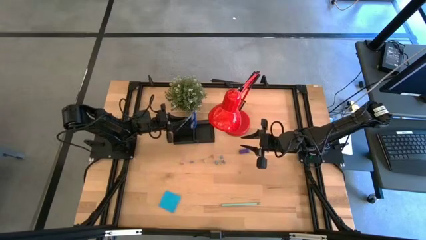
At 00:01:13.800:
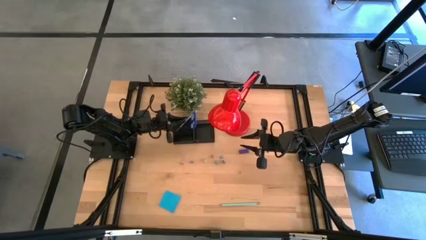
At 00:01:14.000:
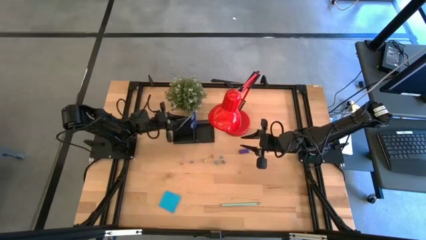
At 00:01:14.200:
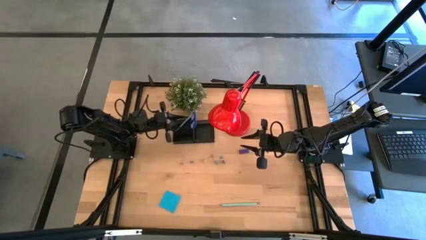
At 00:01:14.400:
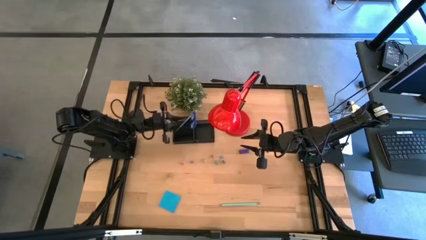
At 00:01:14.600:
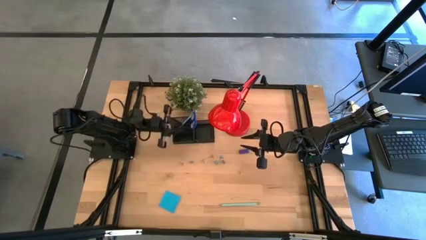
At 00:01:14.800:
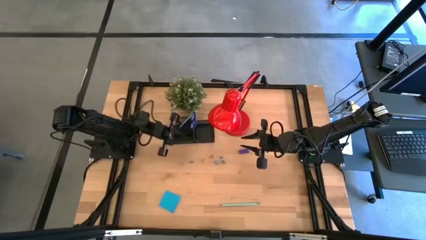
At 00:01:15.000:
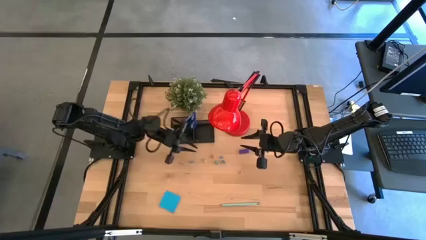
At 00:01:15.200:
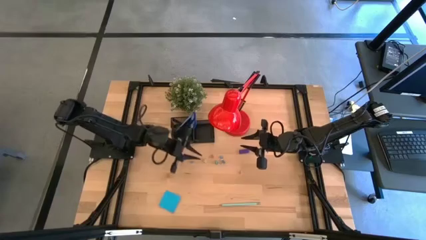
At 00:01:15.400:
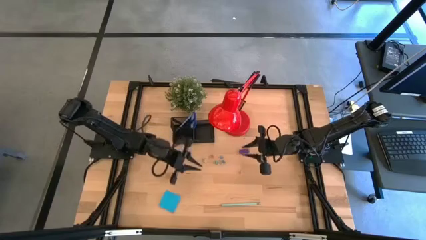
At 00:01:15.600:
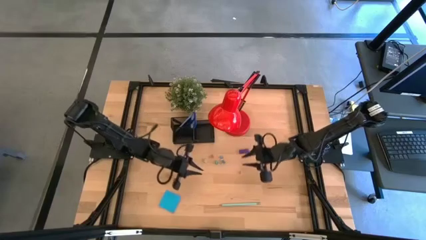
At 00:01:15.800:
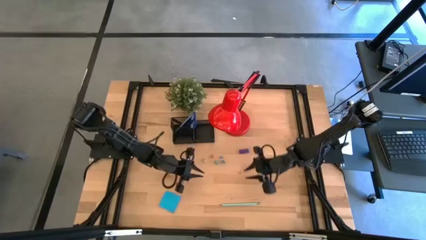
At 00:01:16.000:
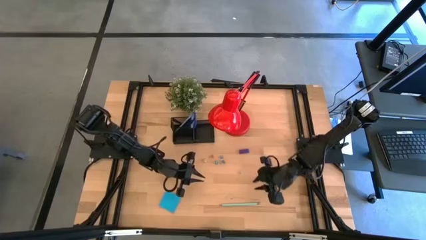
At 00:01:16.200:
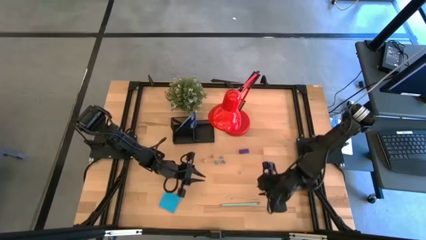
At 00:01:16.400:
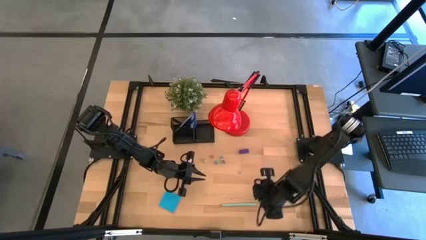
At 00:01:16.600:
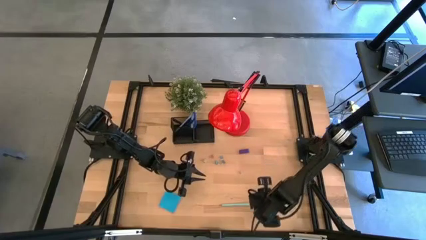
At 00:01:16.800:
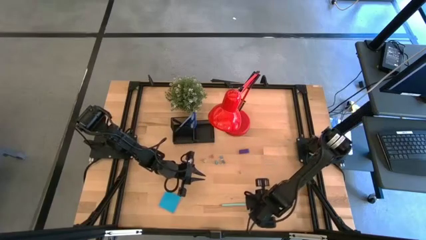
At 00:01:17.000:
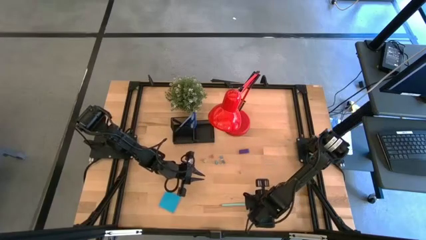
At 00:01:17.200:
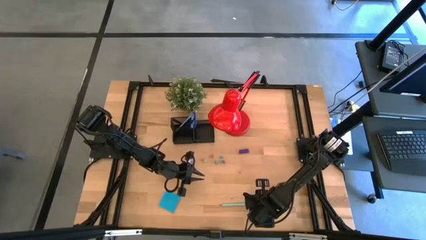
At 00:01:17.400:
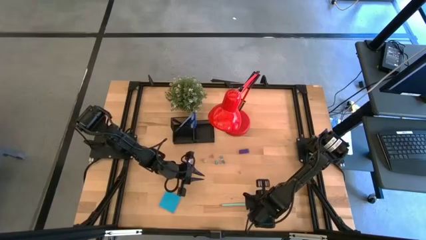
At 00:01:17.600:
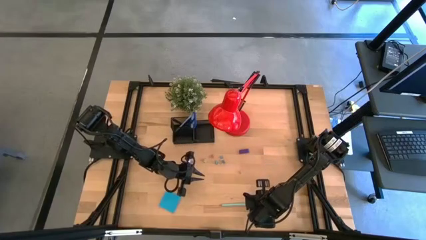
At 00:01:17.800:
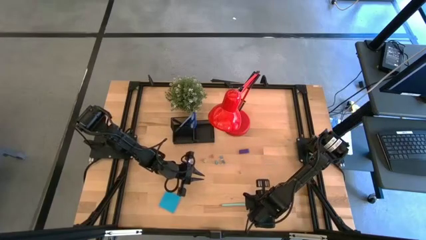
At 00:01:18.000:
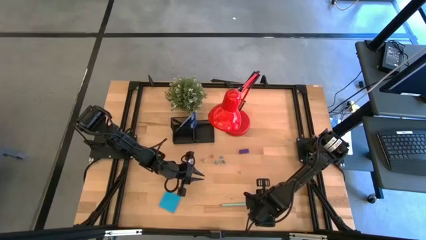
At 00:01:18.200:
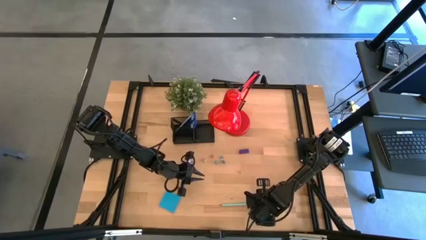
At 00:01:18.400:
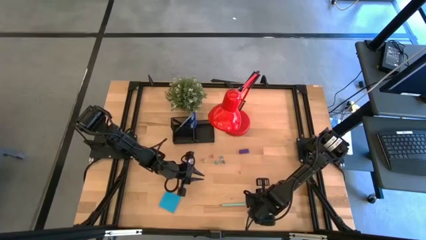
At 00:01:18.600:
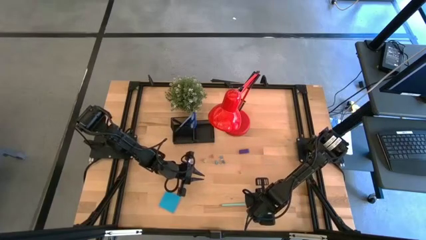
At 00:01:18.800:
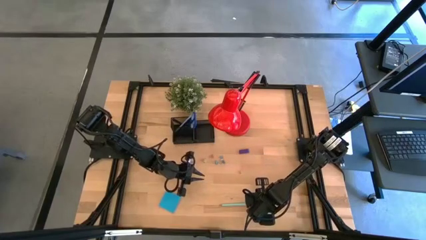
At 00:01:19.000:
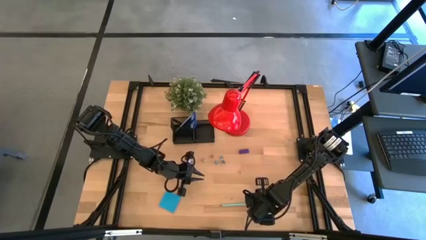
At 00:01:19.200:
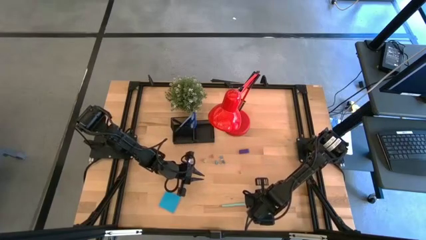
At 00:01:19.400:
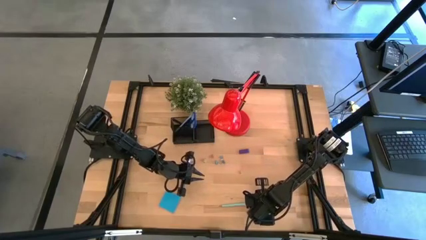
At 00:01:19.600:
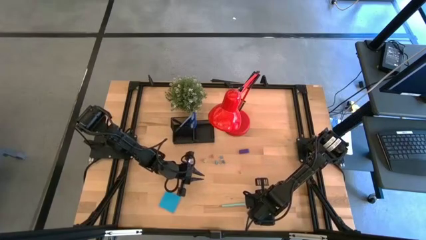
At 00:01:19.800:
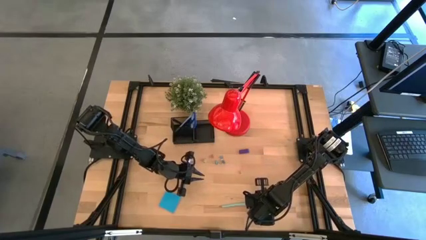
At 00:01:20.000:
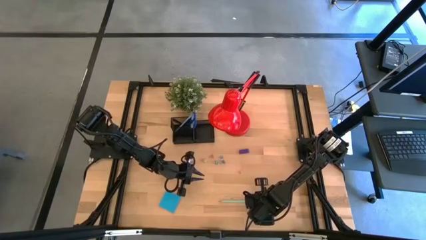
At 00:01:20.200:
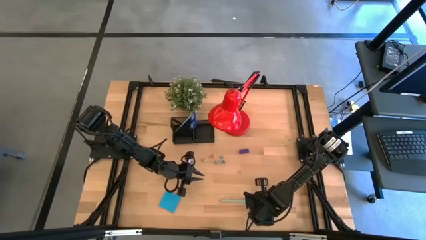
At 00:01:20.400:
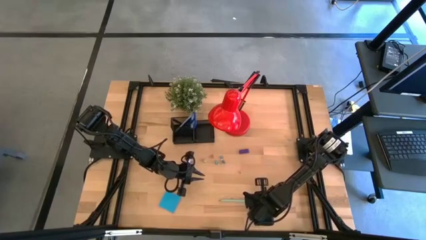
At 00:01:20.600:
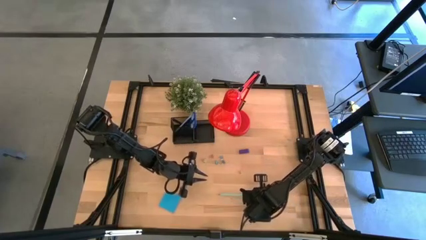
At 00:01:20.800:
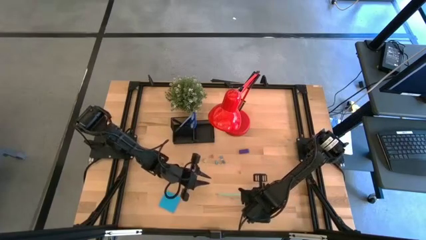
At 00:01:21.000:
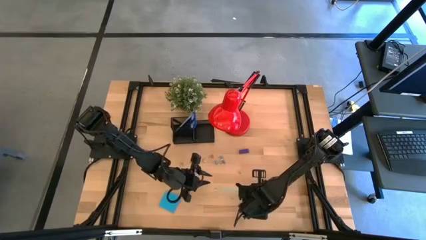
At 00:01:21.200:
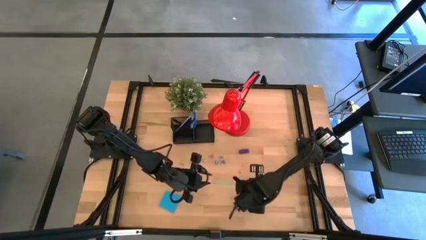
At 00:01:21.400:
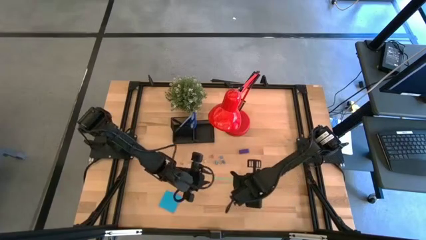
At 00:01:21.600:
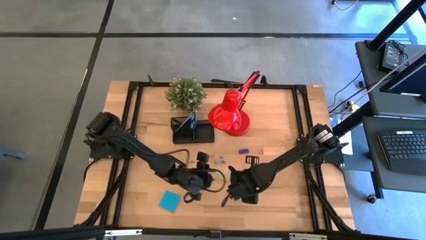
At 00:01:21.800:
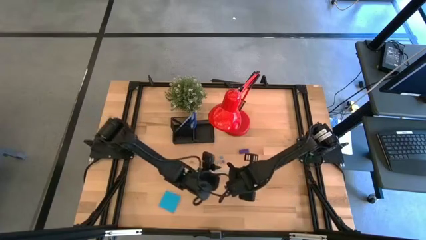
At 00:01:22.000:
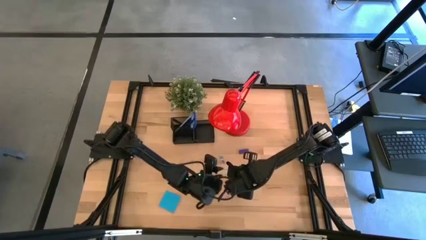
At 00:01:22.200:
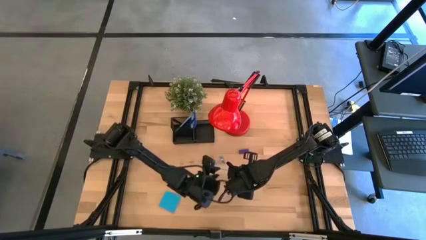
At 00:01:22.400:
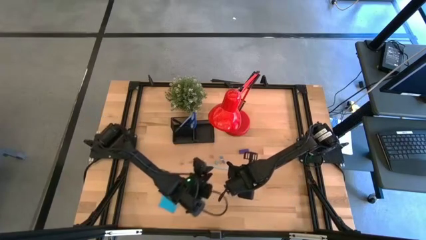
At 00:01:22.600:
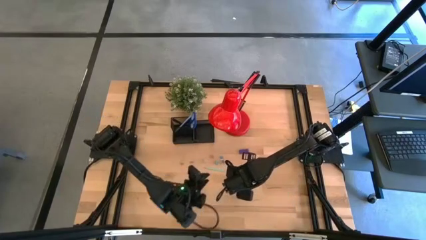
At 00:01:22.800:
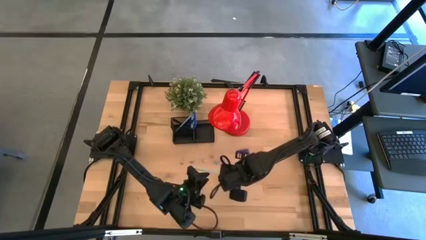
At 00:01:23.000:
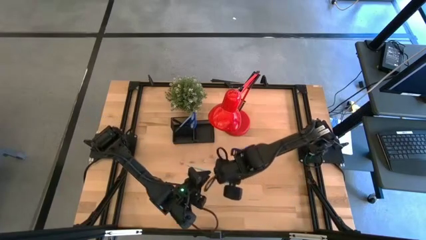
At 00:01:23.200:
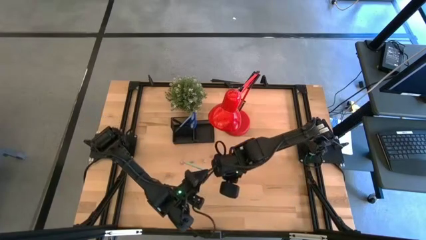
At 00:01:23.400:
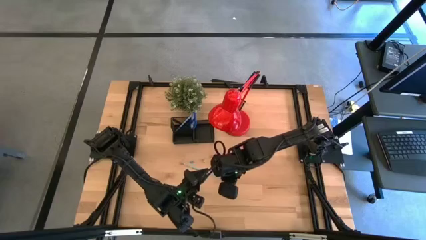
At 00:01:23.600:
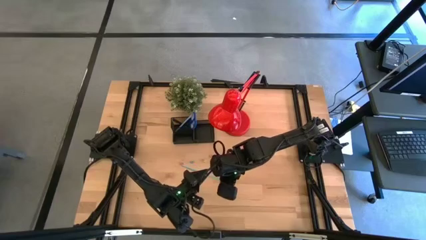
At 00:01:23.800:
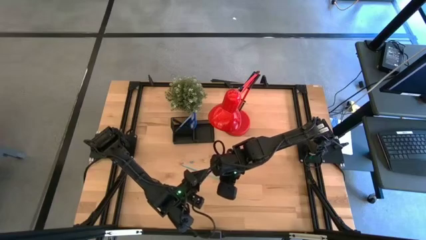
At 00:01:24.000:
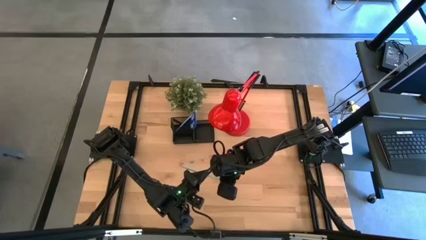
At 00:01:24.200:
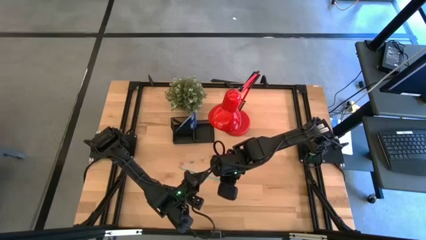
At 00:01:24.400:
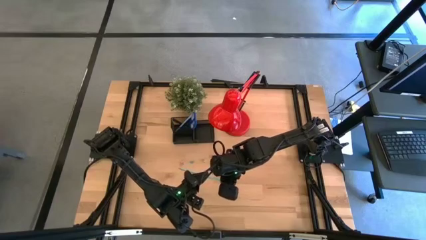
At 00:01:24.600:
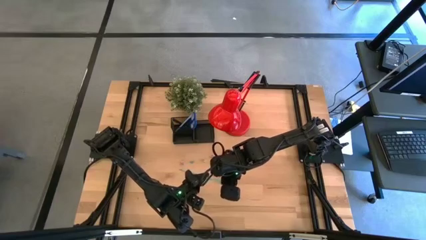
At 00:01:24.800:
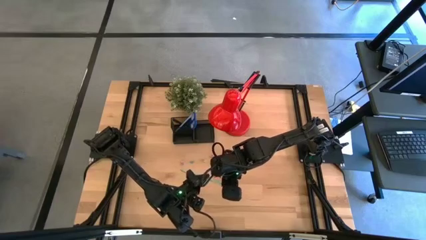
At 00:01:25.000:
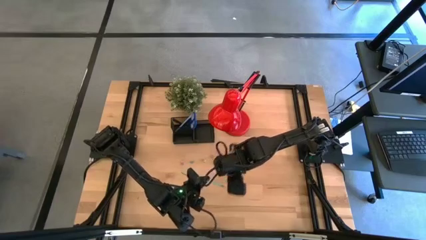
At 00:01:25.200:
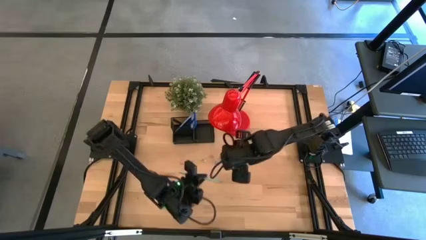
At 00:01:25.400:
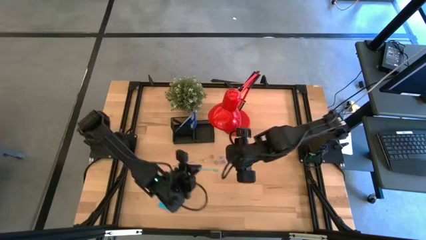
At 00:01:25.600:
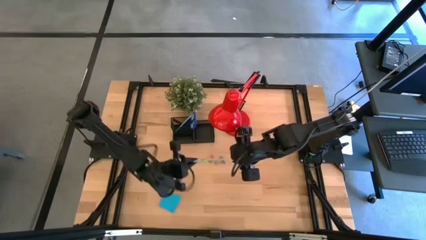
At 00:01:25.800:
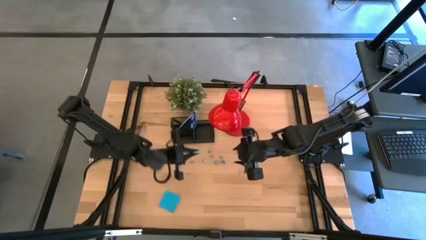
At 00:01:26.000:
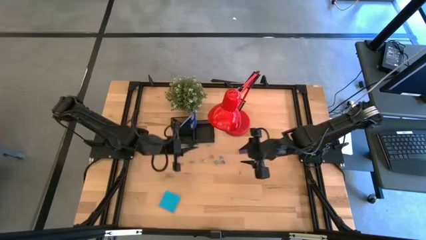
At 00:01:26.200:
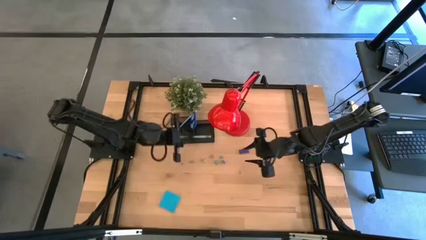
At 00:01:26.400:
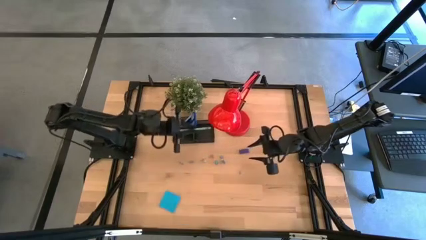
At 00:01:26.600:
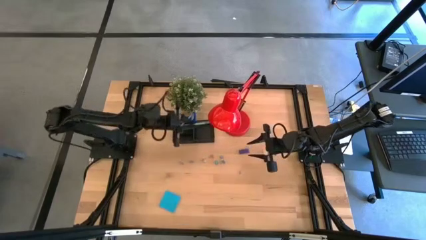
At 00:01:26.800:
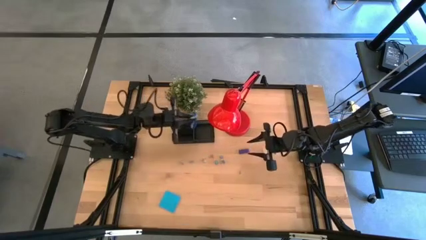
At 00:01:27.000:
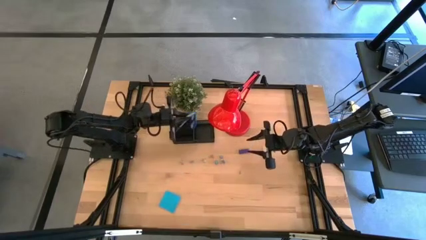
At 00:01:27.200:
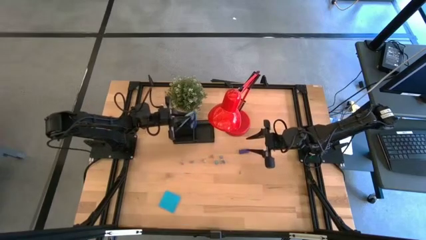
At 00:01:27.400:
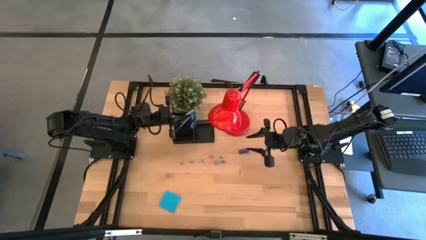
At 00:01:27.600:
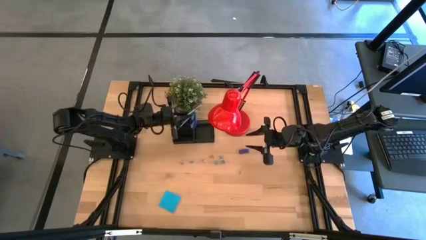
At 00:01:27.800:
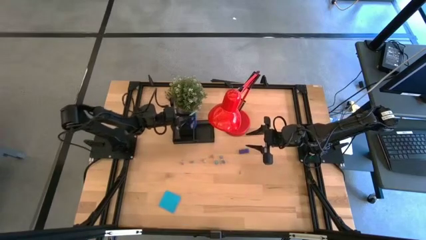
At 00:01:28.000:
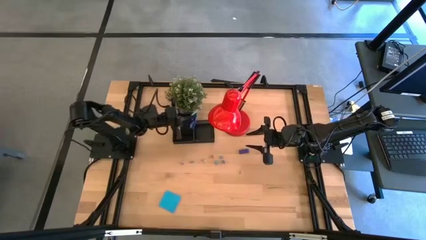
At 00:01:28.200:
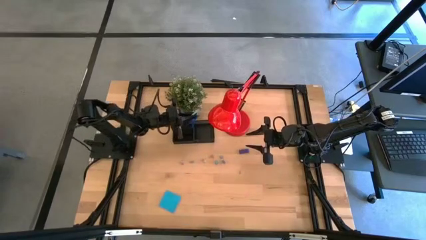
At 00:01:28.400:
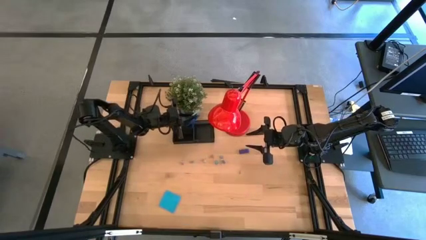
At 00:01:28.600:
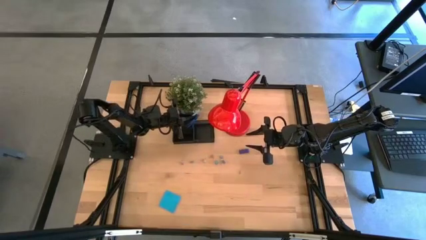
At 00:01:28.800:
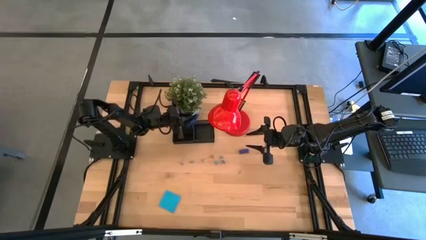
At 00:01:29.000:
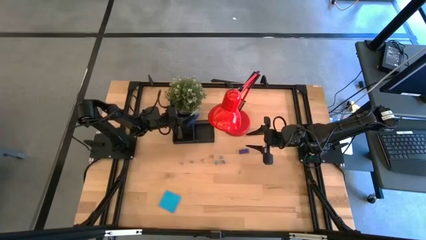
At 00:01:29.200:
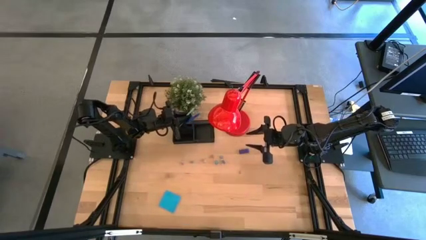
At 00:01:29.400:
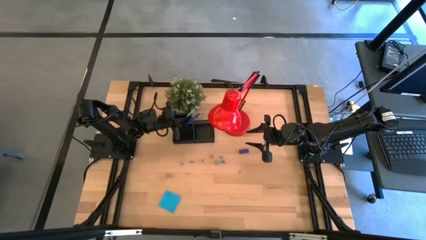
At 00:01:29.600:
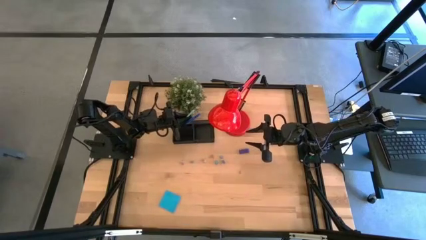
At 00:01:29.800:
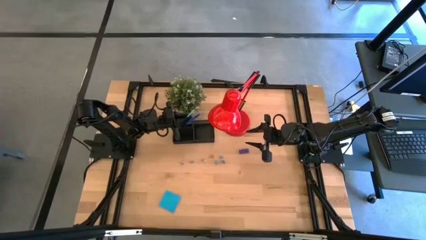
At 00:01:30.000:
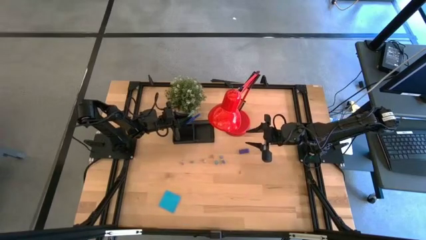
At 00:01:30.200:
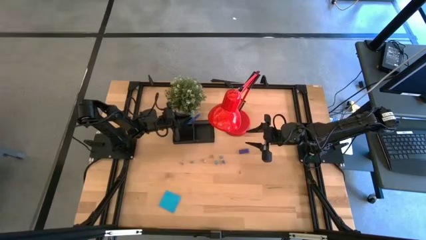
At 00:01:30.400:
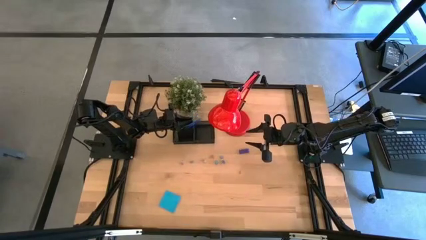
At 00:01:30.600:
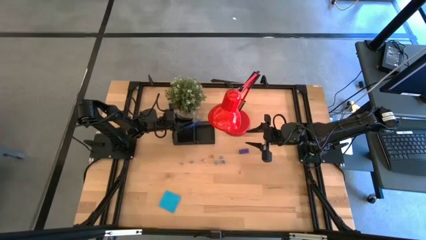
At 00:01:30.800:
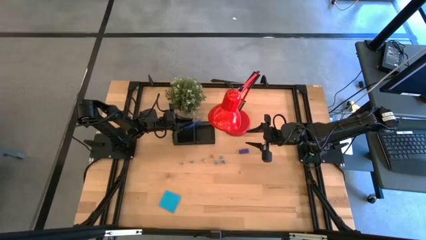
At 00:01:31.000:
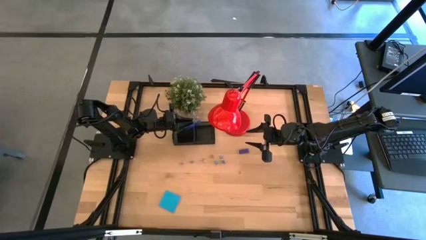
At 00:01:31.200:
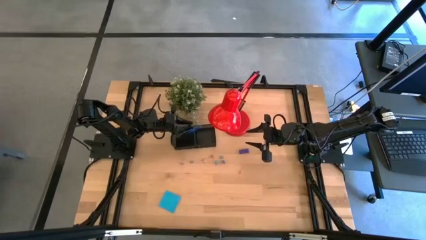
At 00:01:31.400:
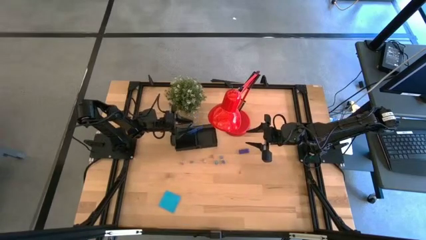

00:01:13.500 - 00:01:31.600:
Task: Pick and place office supplies into organizer
Put the green pencil into the black desk organizer
